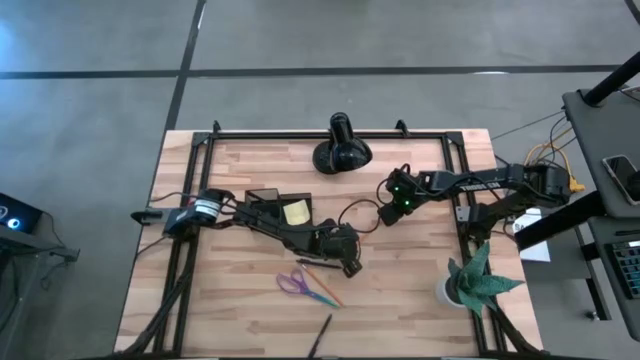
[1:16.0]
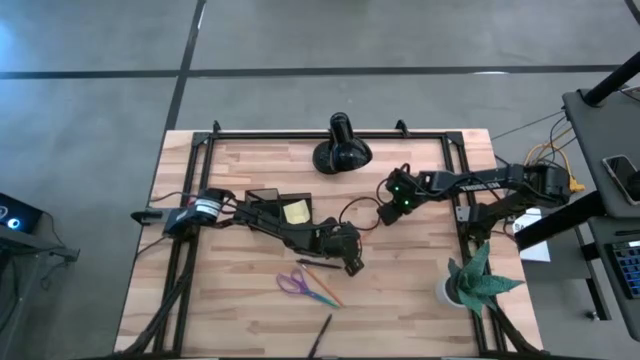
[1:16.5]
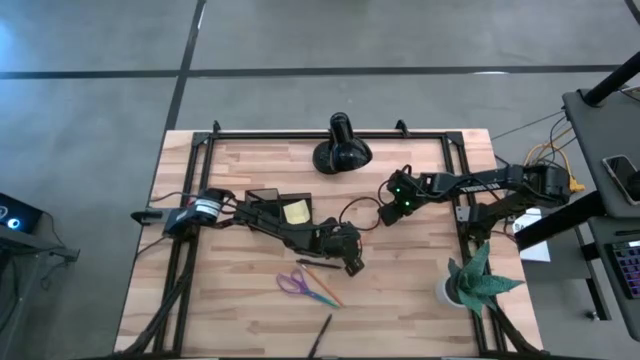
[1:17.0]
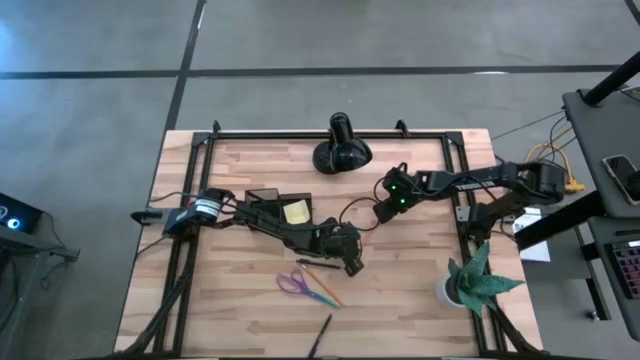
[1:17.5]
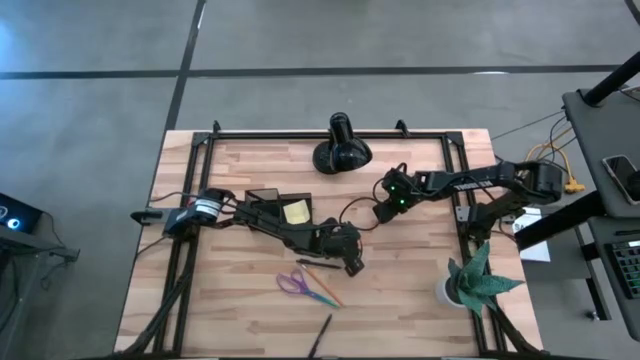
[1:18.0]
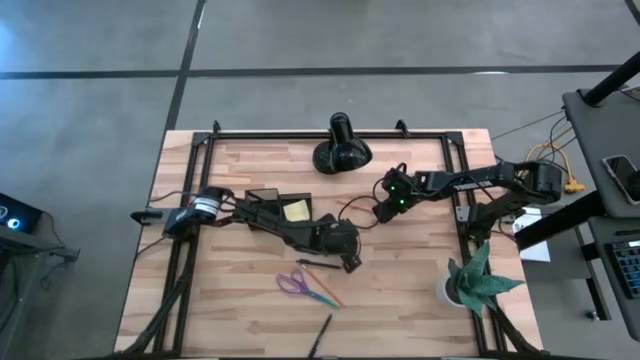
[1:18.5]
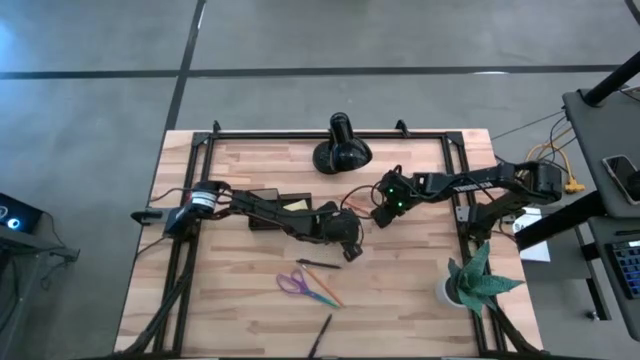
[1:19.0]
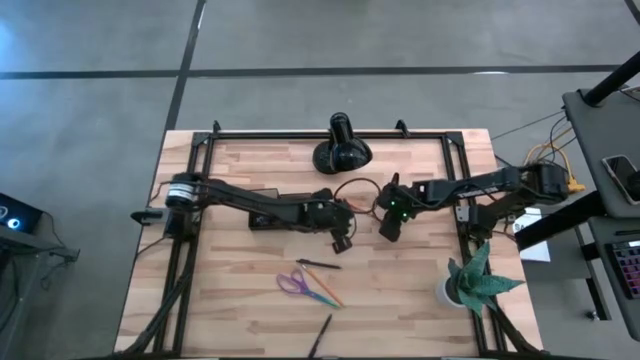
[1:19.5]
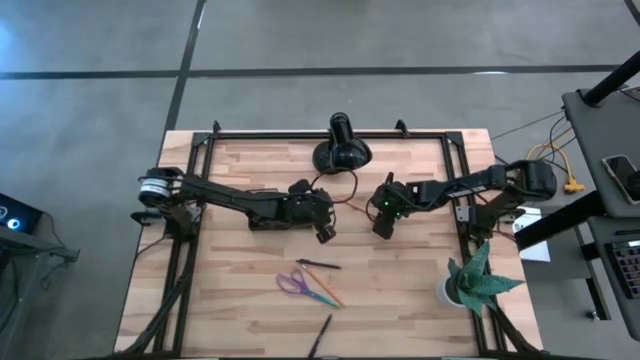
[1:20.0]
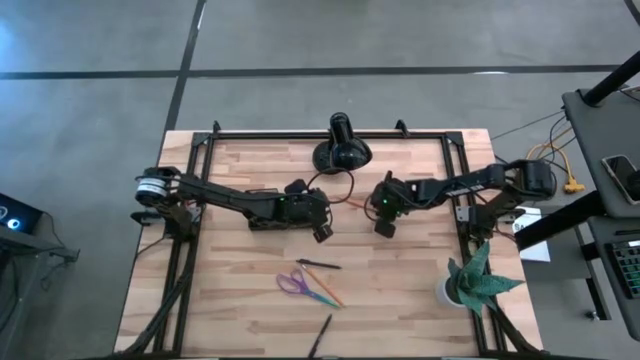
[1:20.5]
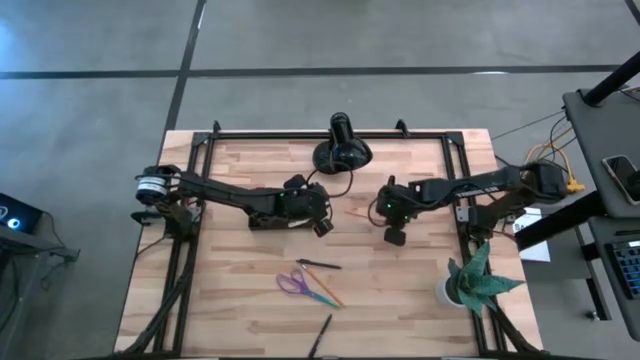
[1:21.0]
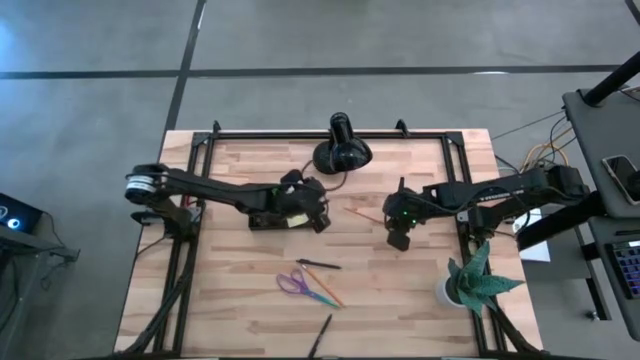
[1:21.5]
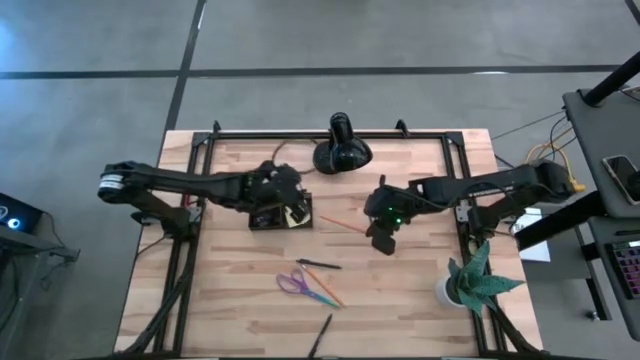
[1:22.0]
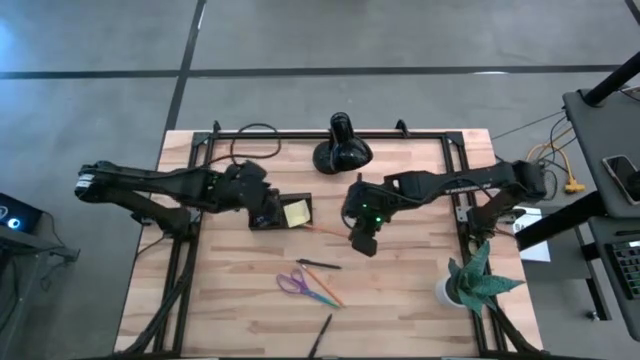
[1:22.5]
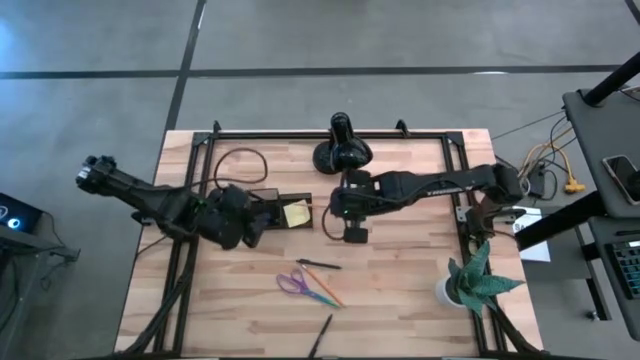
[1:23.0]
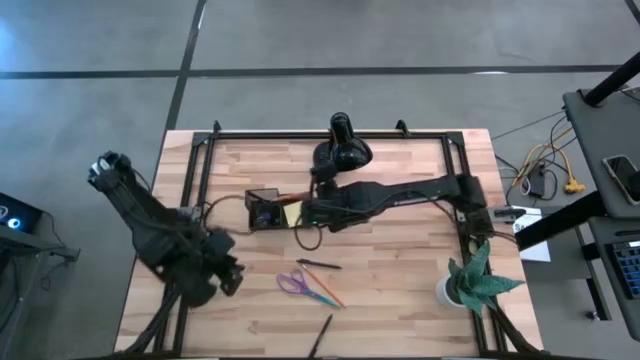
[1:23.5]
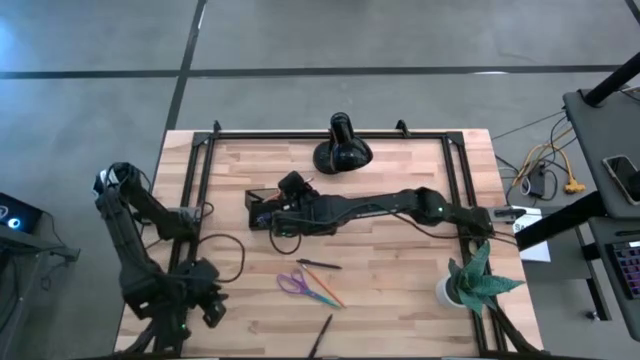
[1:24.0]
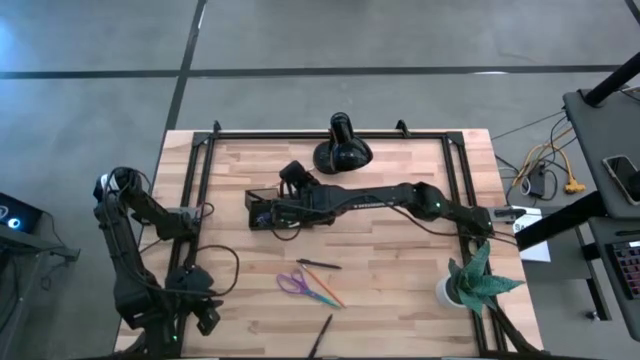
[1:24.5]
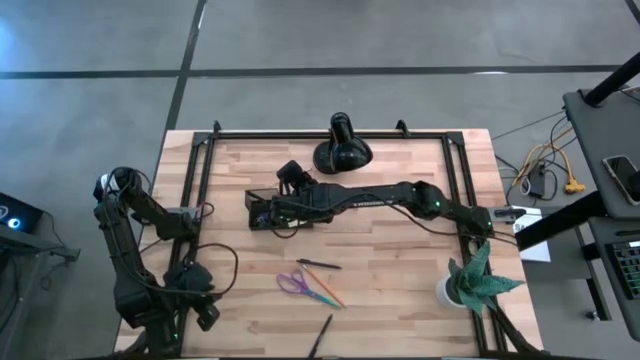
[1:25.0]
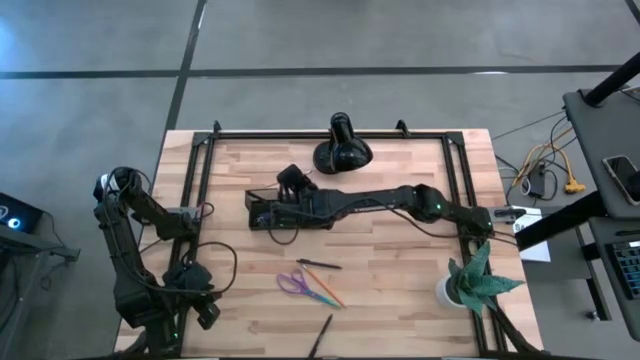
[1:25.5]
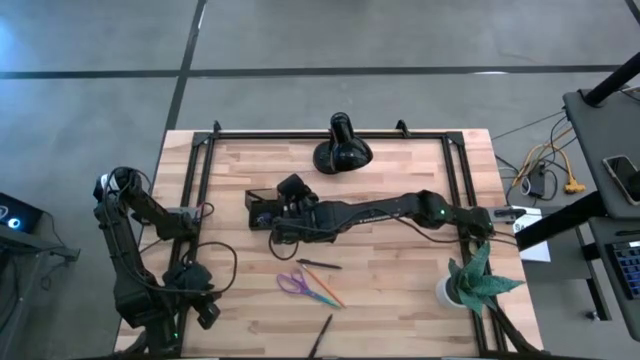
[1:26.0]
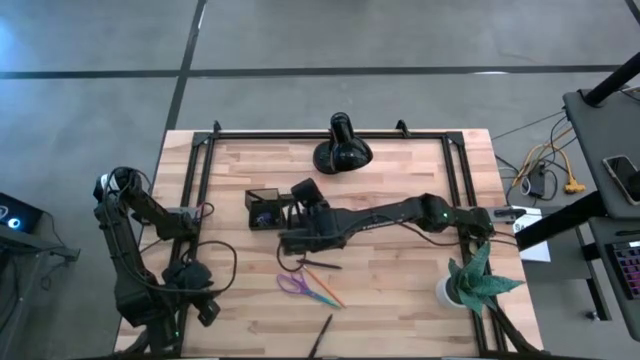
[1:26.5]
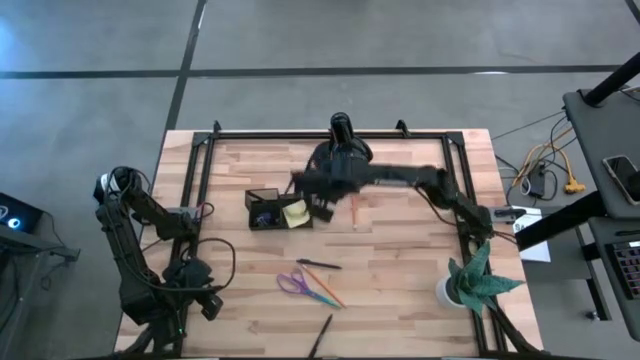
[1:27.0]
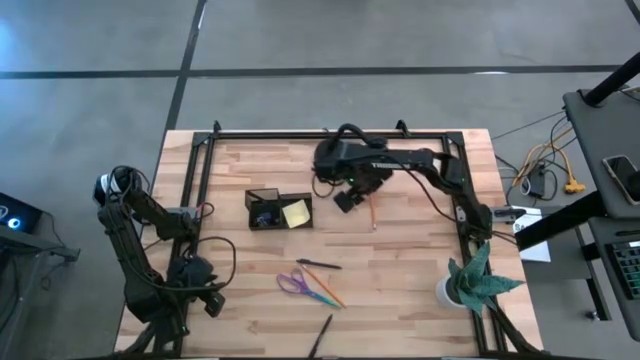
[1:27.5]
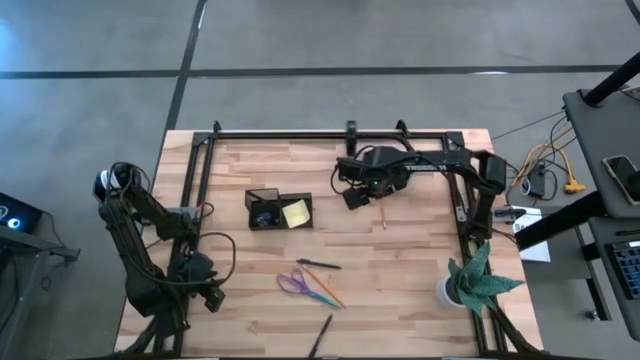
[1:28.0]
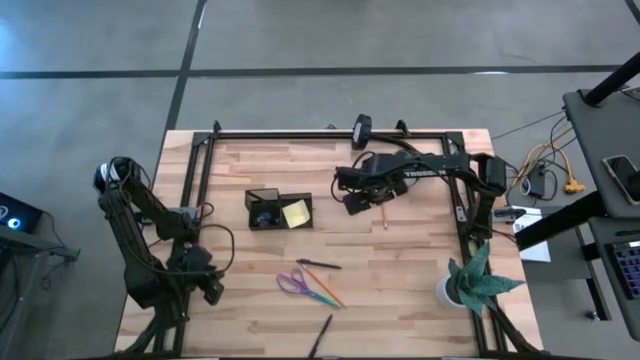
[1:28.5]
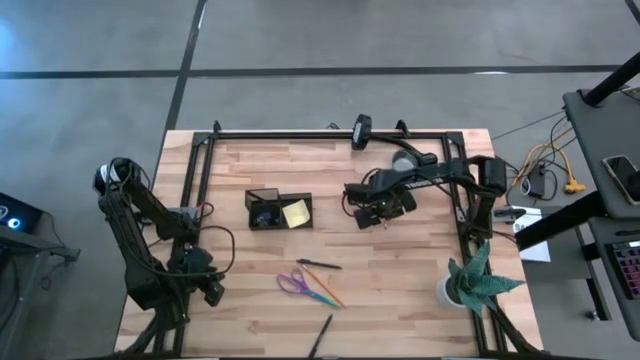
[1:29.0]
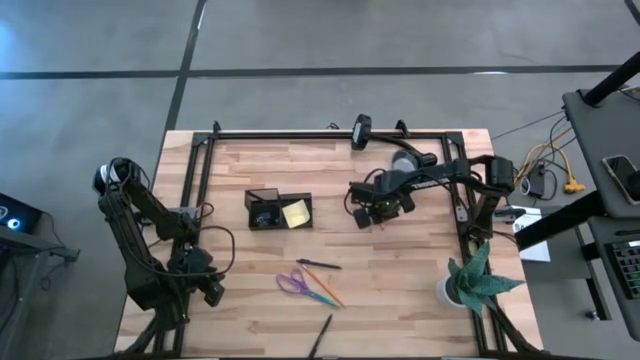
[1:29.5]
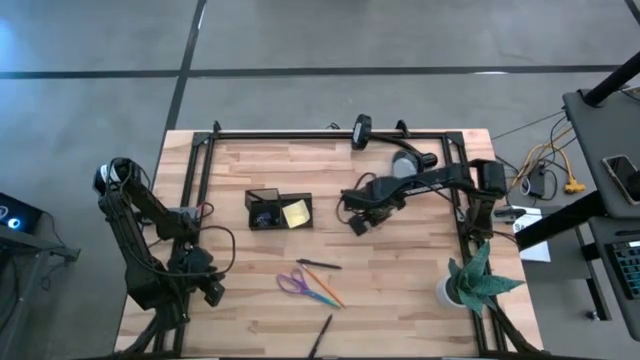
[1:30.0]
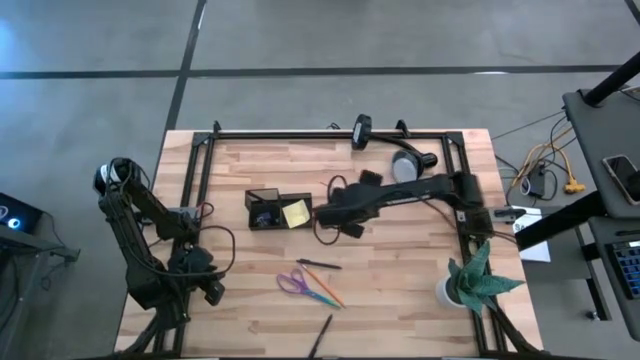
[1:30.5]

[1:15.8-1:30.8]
Task: Pick and place office supplies into organizer
Put the top yellow pencil into the black desk organizer

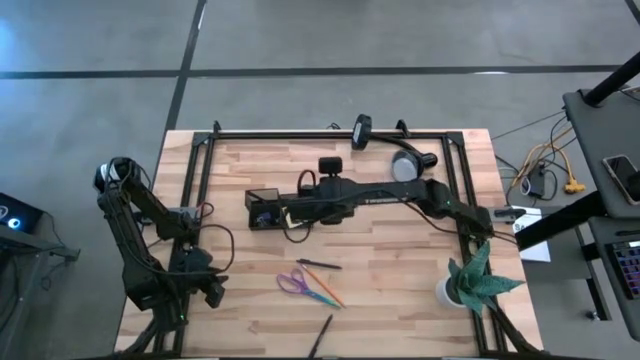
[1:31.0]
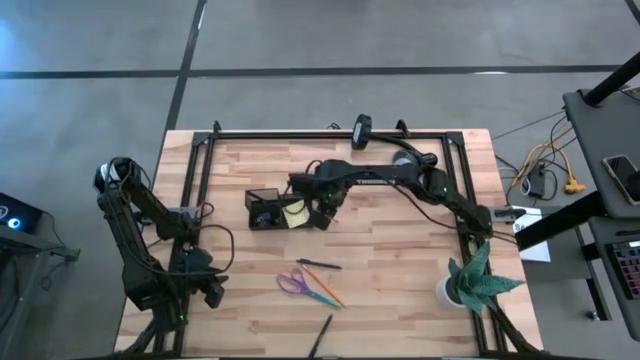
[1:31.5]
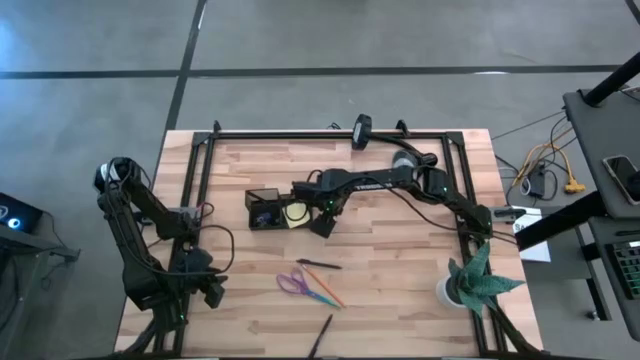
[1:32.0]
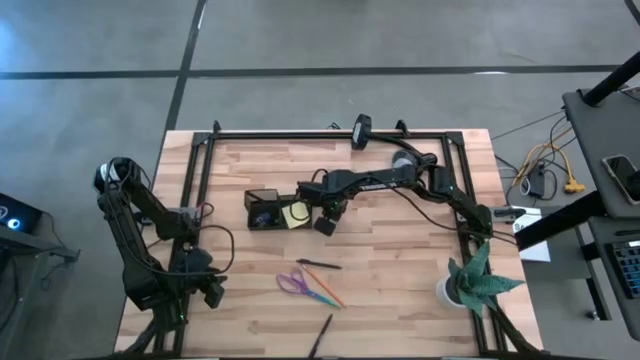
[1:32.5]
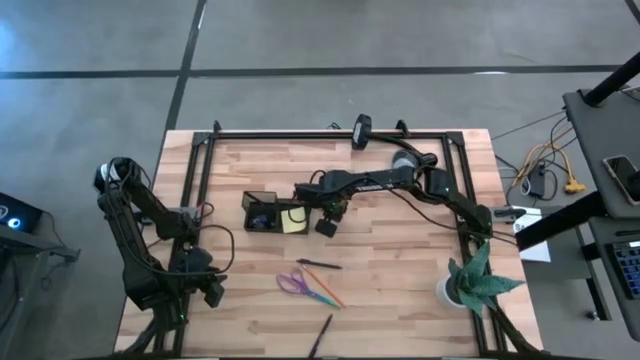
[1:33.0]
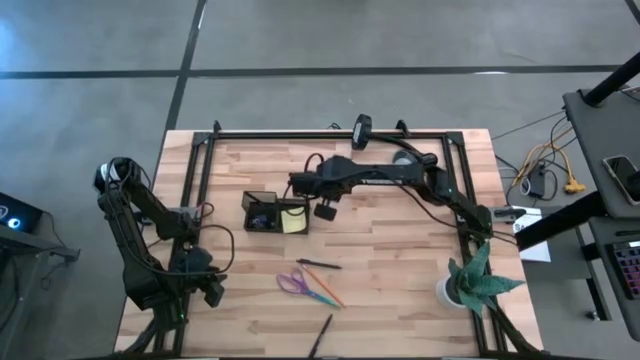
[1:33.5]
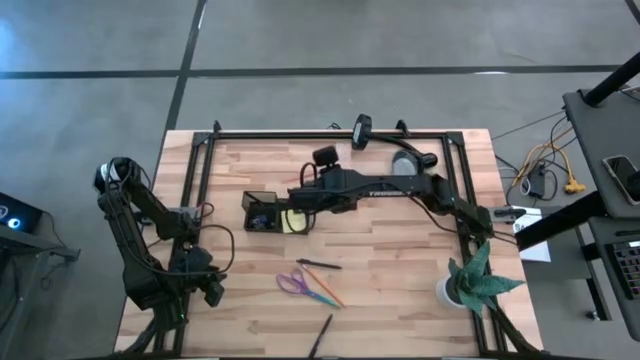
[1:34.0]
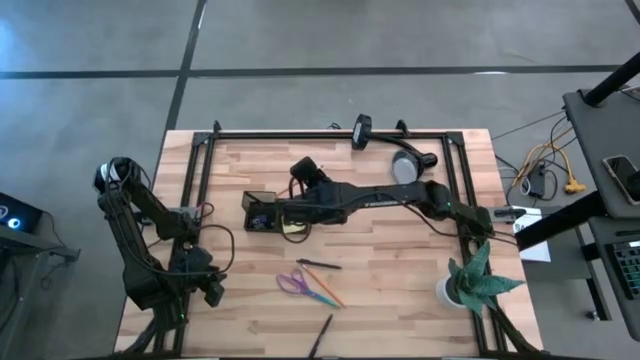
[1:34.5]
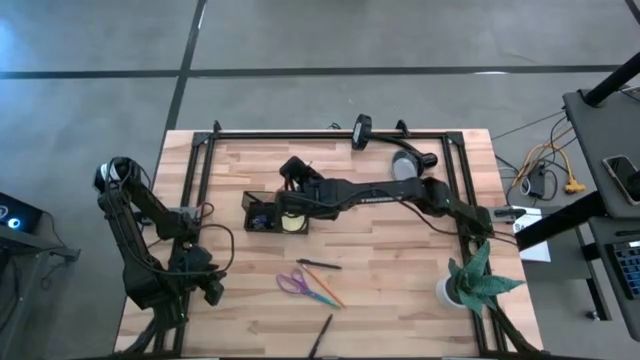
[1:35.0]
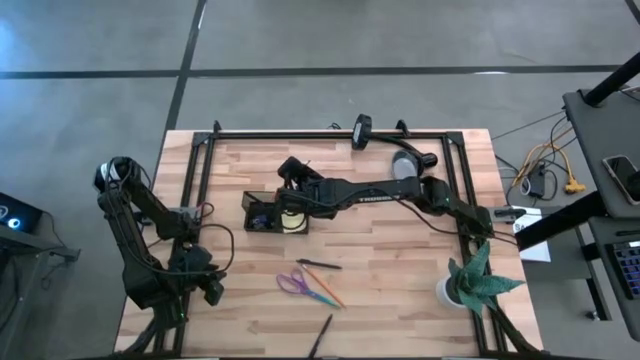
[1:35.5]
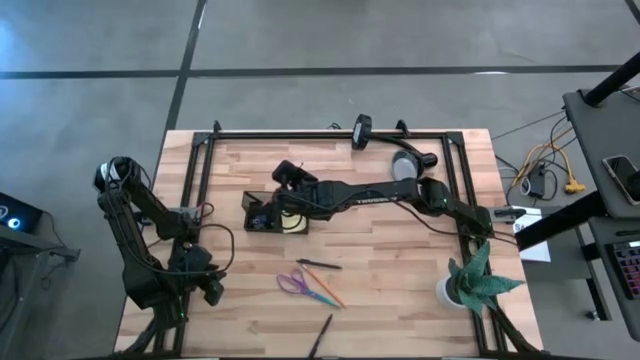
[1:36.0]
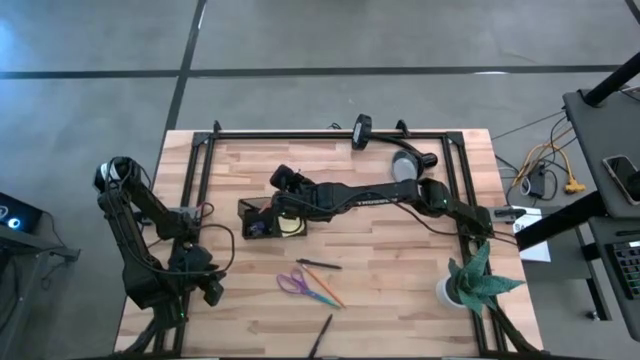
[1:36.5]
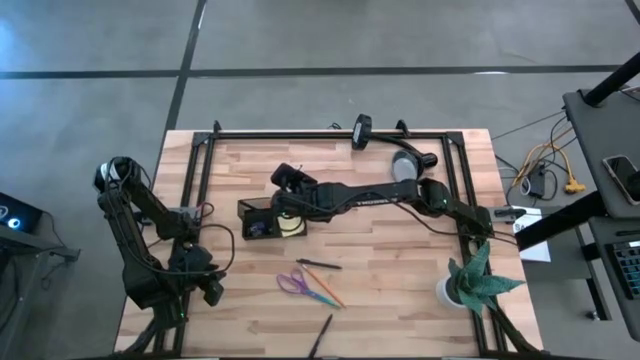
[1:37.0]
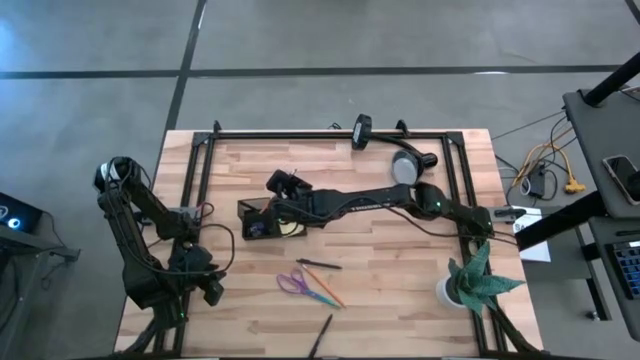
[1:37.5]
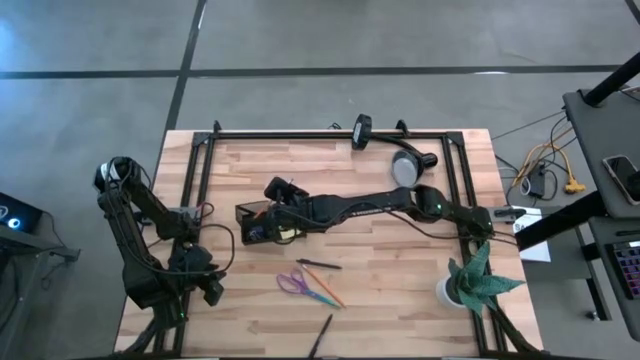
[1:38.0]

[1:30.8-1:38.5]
Put the top yellow pencil into the black desk organizer
